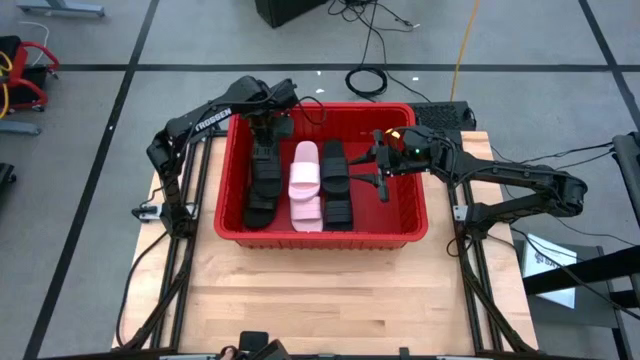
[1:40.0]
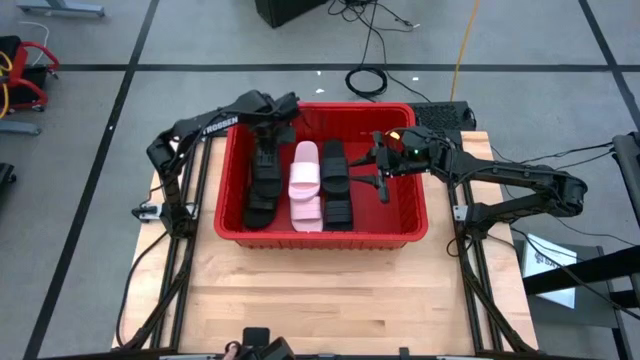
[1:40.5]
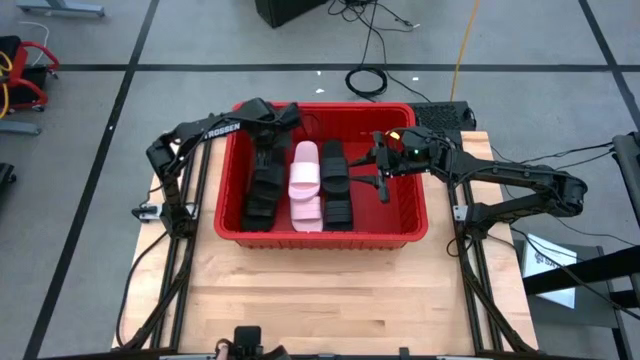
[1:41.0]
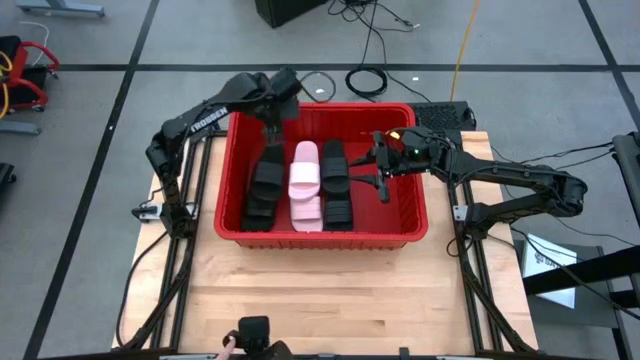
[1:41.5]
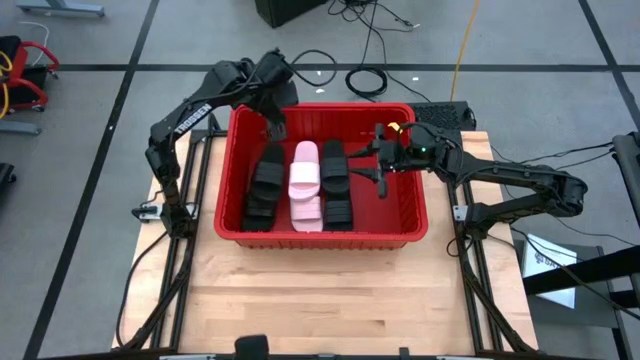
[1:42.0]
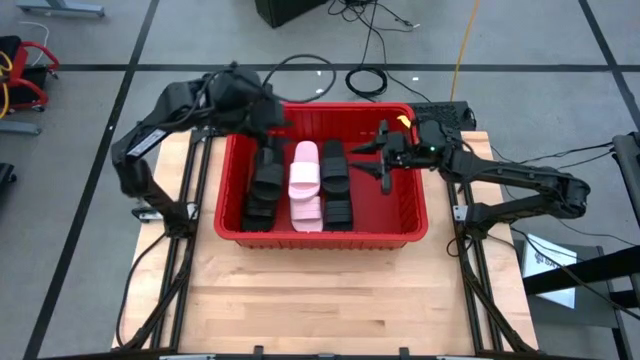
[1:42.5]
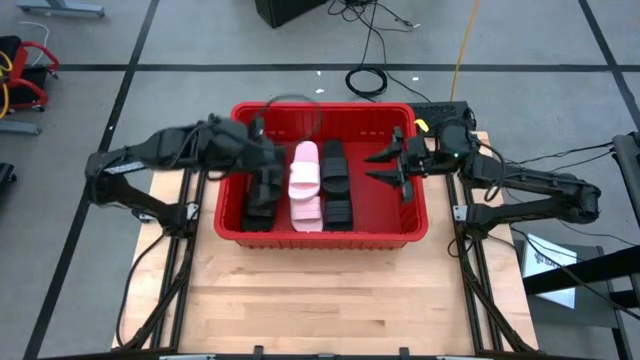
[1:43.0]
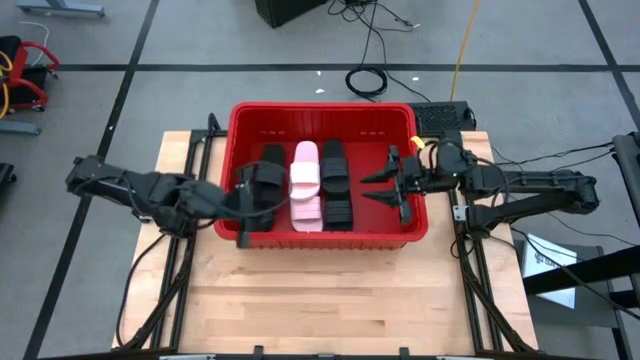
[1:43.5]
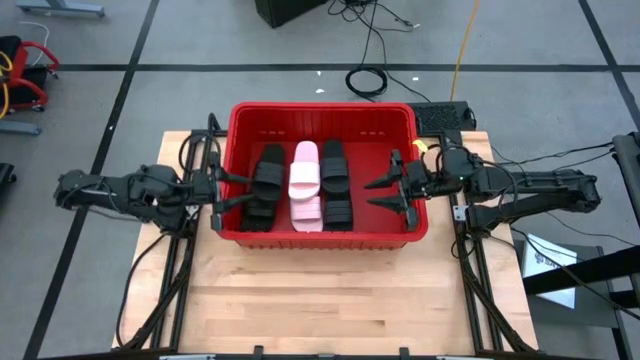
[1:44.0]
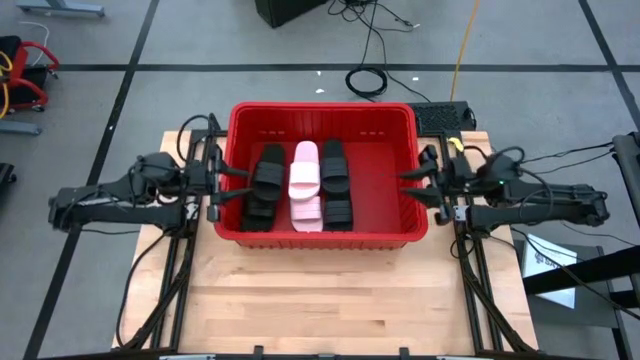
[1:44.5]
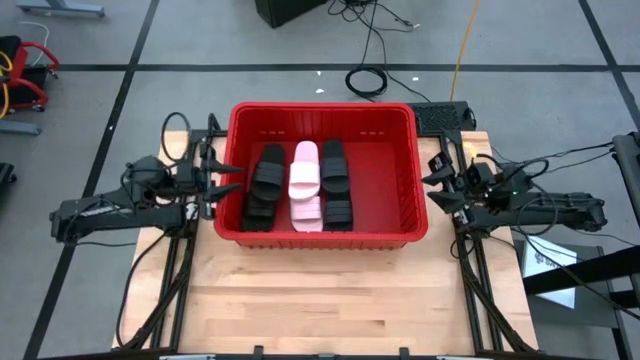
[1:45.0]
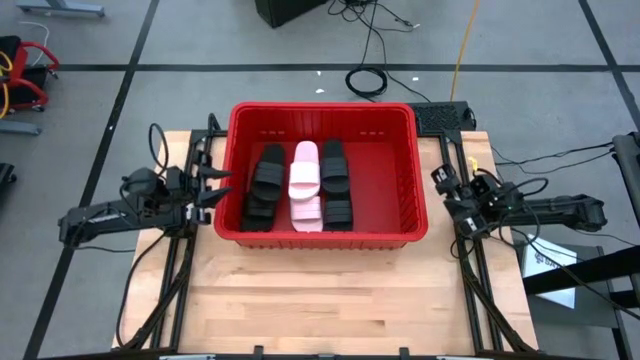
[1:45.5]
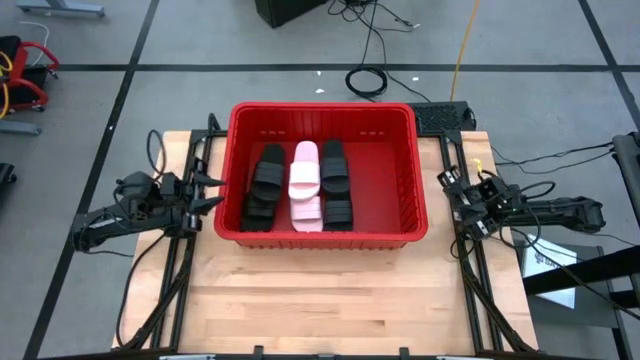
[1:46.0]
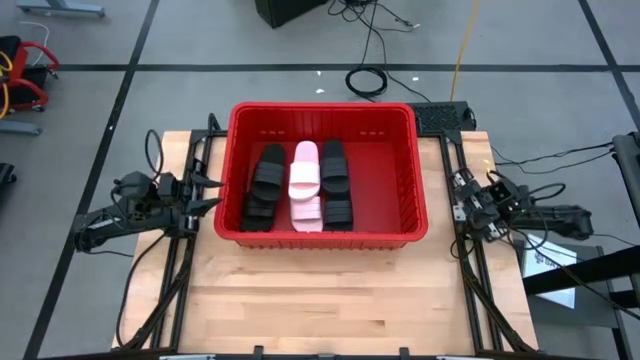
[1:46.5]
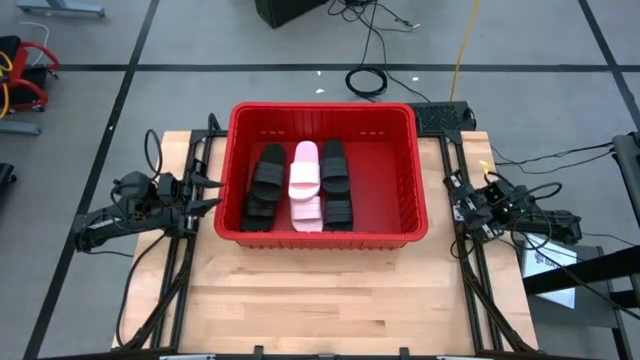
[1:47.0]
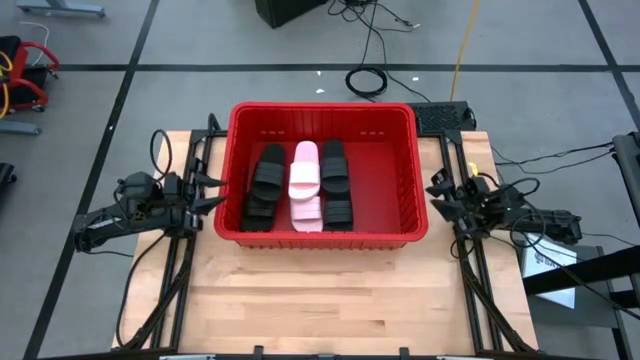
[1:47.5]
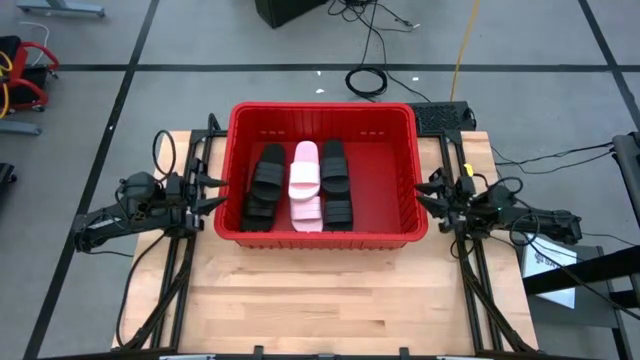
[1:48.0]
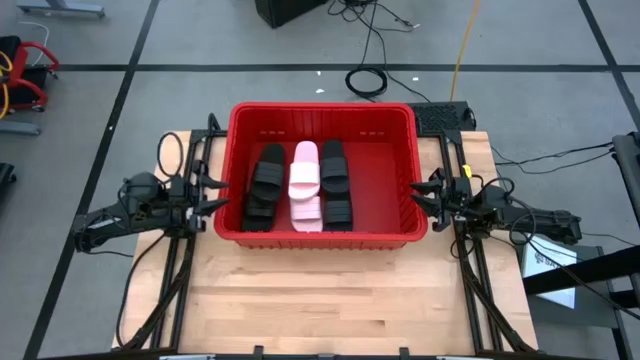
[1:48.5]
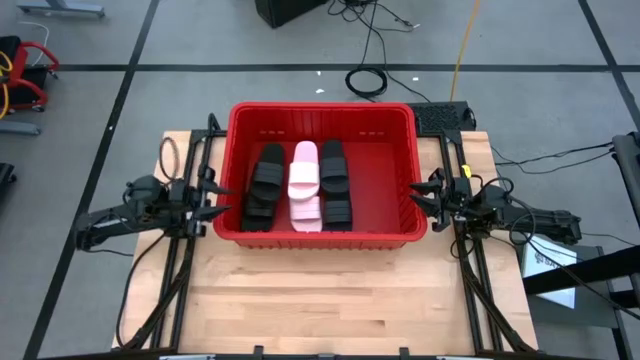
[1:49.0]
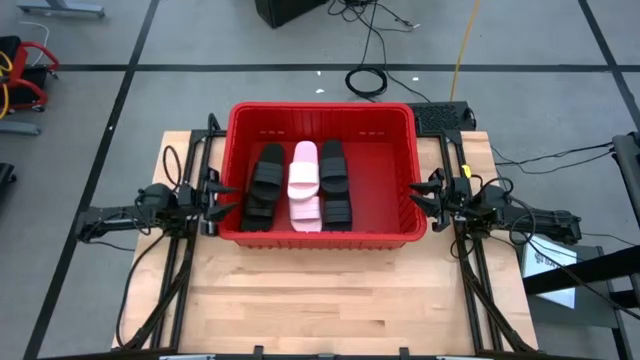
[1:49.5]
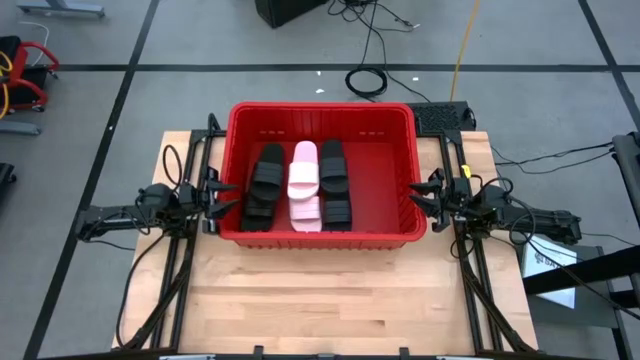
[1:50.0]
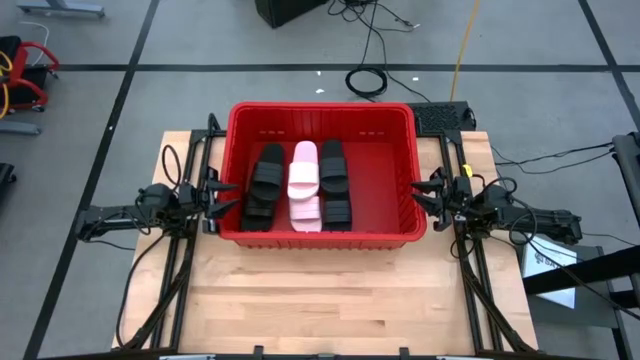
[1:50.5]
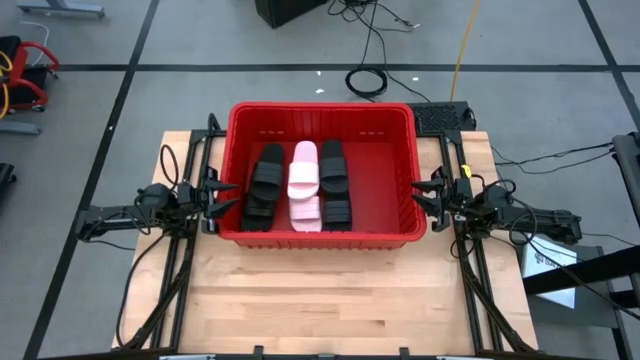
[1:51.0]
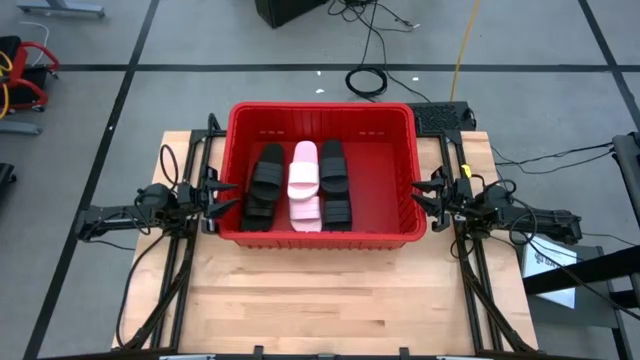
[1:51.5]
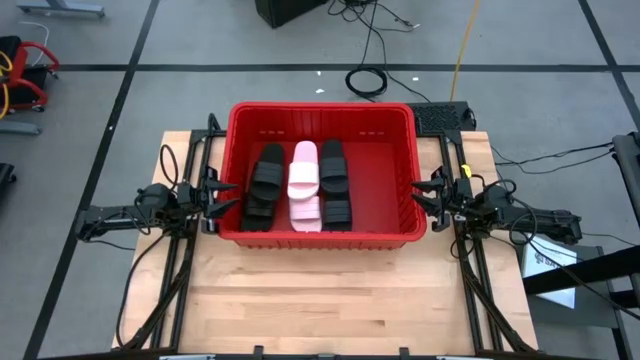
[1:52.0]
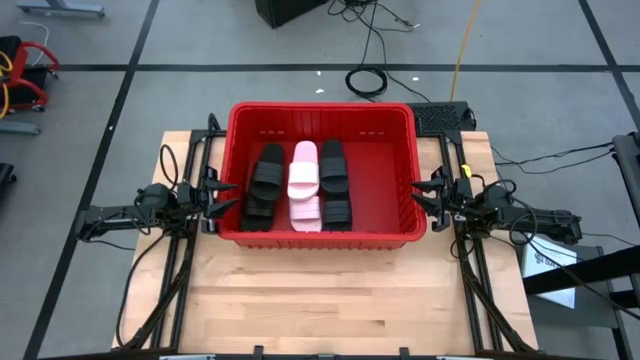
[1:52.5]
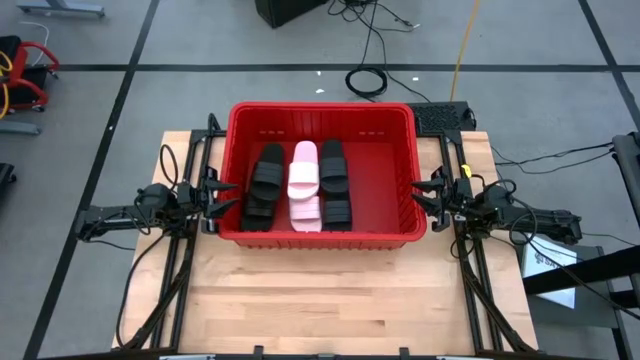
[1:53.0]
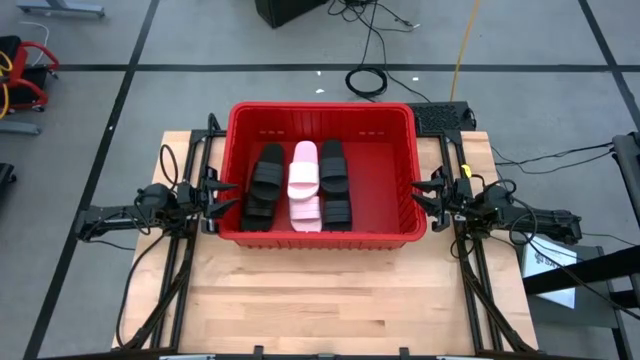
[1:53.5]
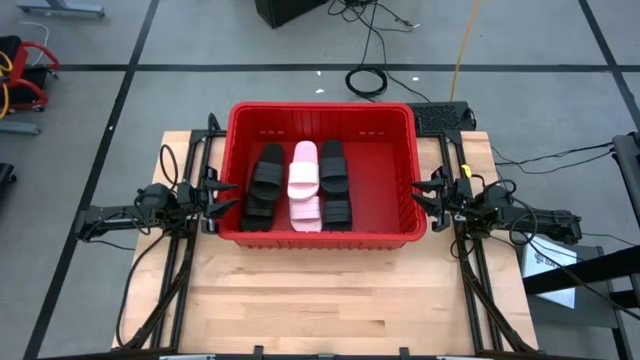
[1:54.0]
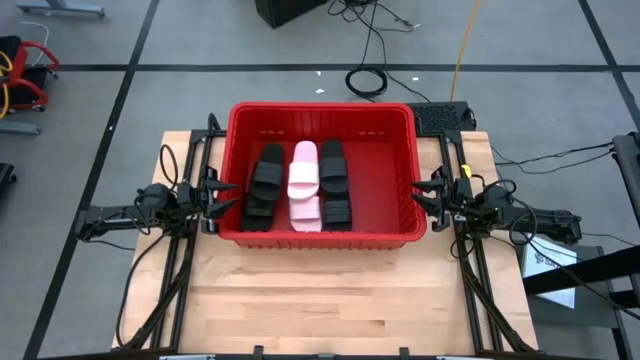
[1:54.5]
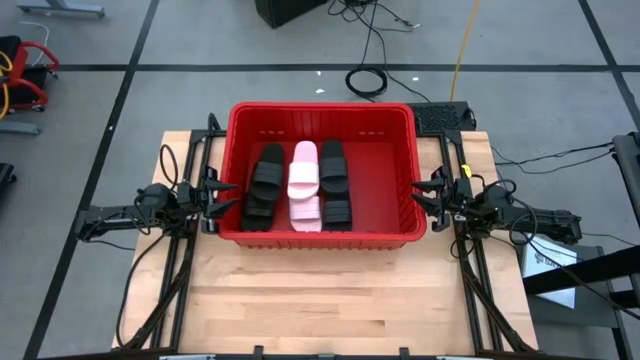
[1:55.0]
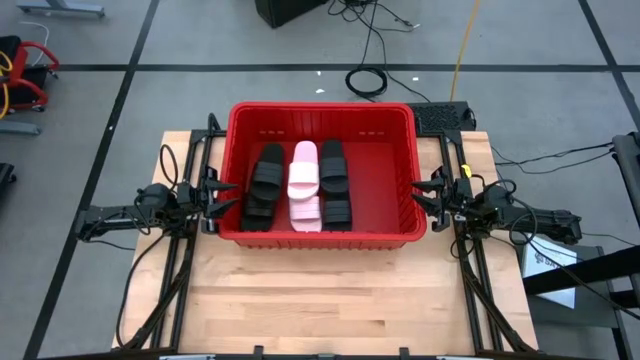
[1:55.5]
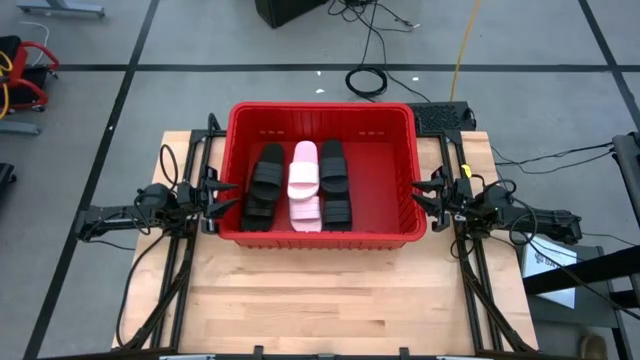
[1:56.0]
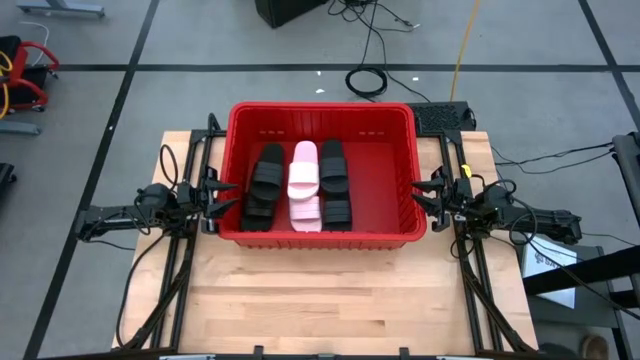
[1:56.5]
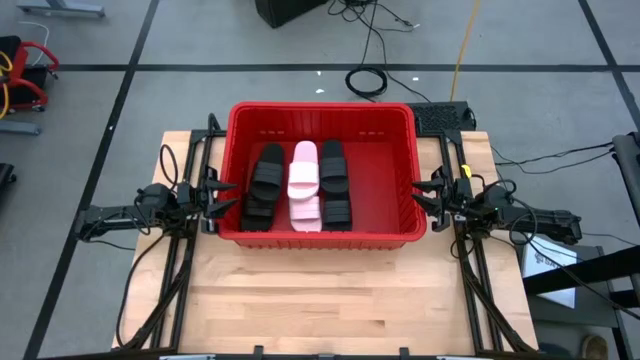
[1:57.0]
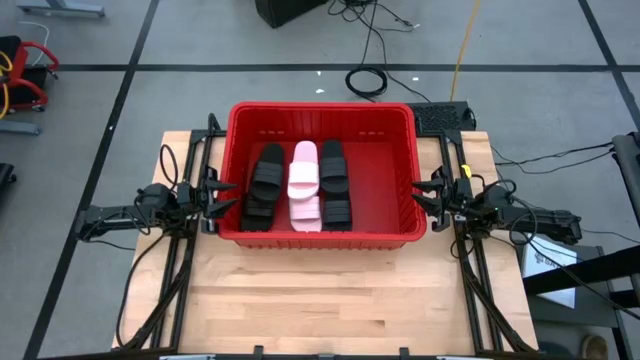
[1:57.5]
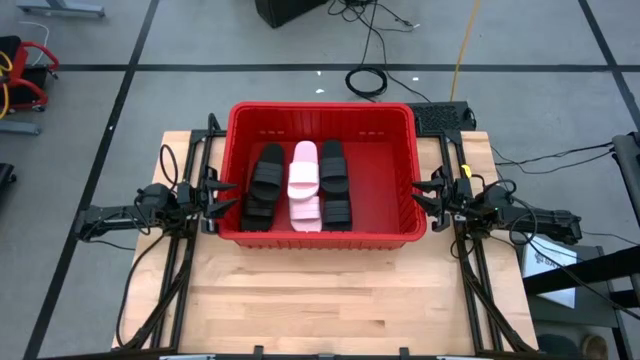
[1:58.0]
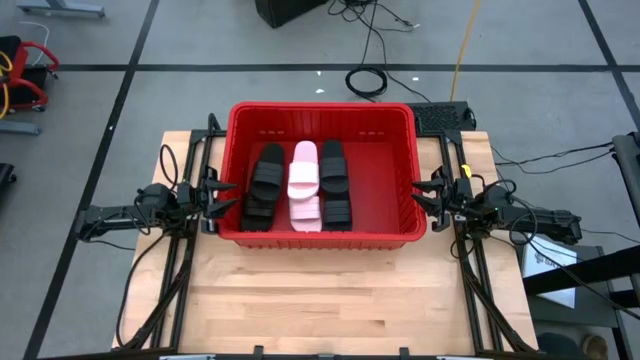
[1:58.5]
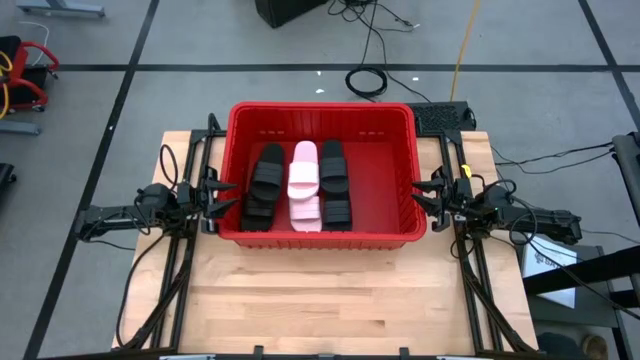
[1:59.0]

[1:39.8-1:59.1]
Task: Pick and place slides into bin
Return to Home Position

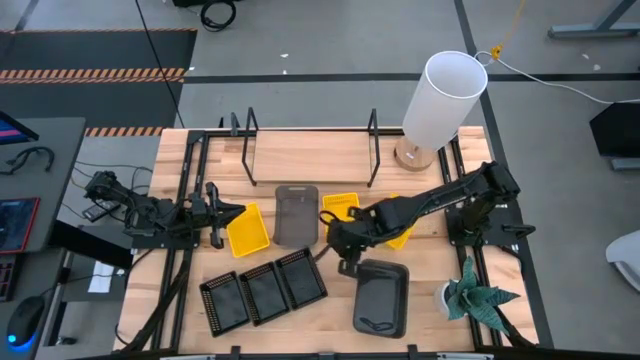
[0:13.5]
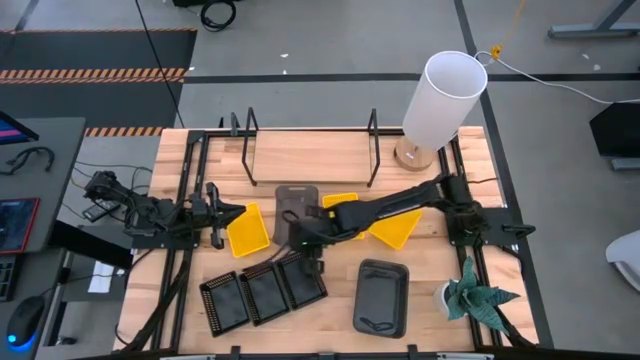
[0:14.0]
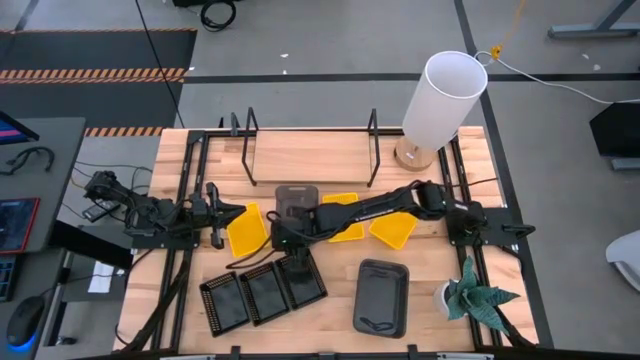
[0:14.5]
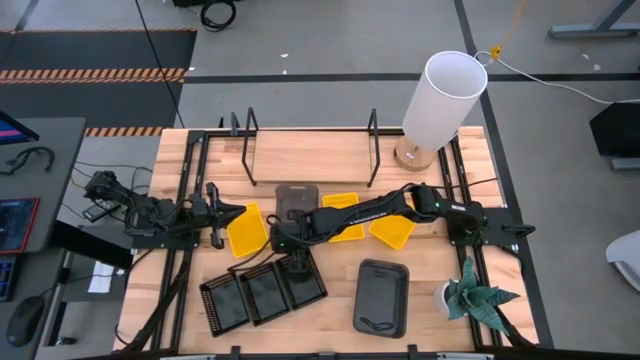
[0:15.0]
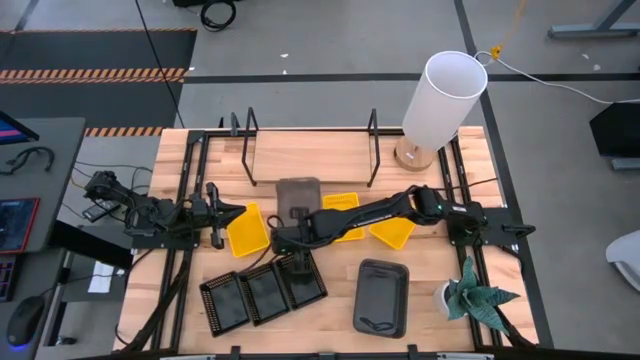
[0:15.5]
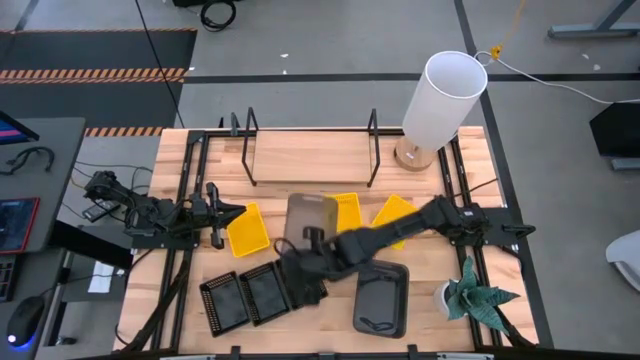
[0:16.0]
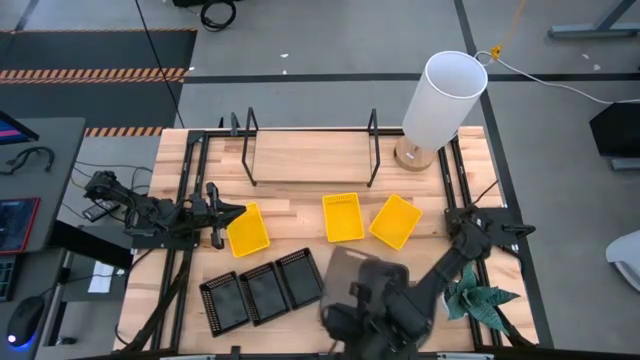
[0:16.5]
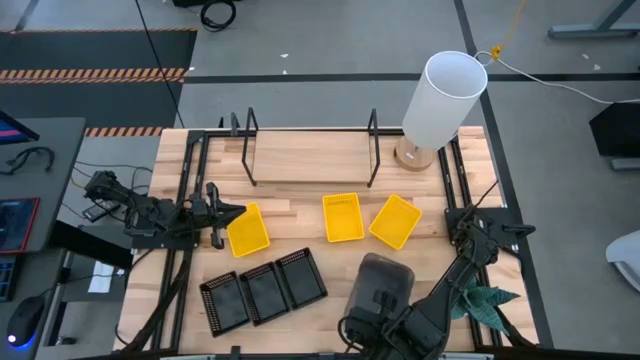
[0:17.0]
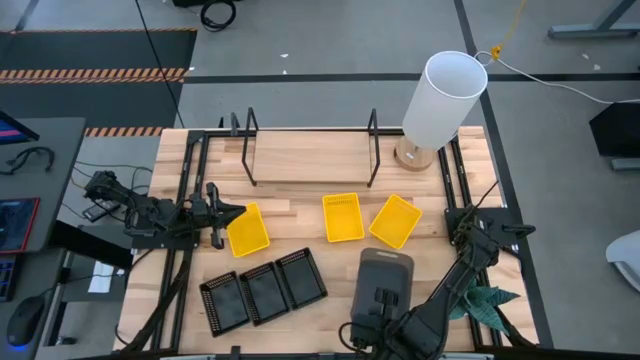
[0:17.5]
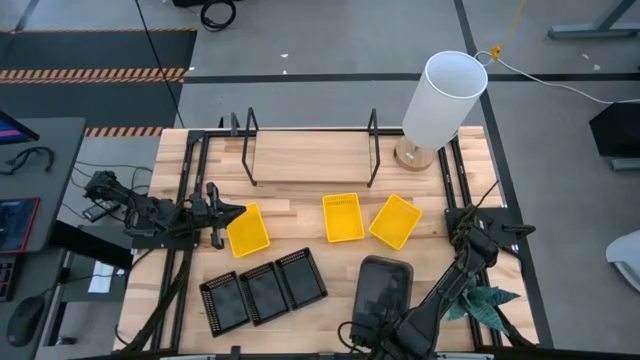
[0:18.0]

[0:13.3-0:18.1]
Task: Stack baskets on shelf by color
Stack the top black bin on the bottom black bins
